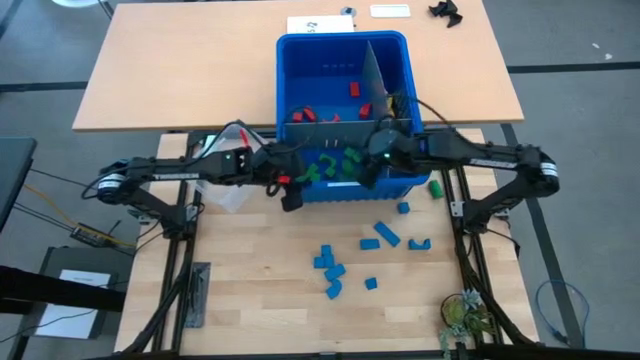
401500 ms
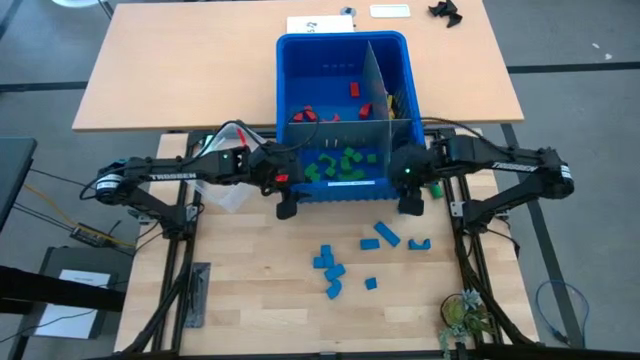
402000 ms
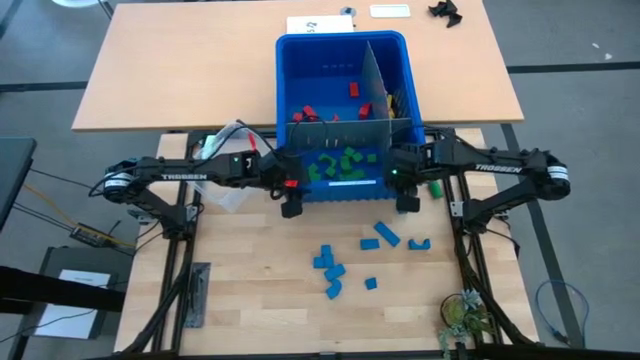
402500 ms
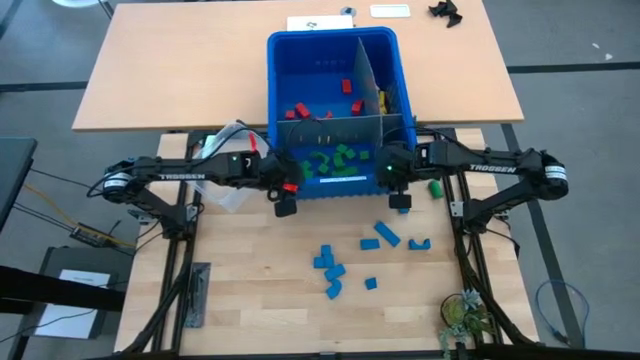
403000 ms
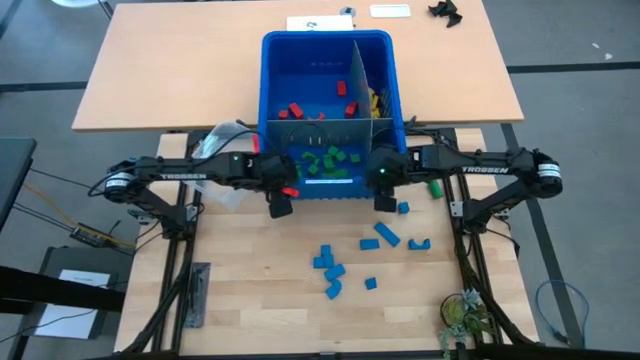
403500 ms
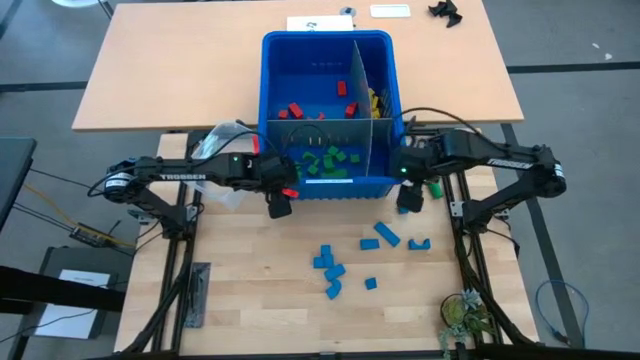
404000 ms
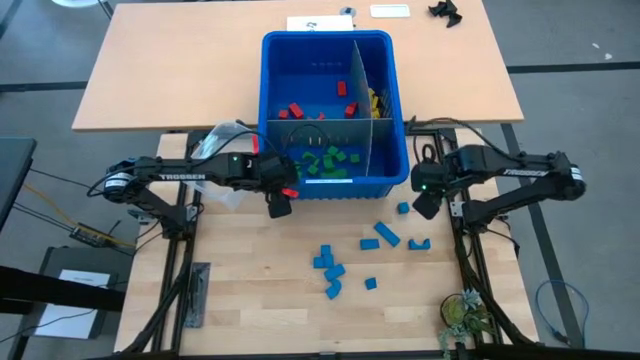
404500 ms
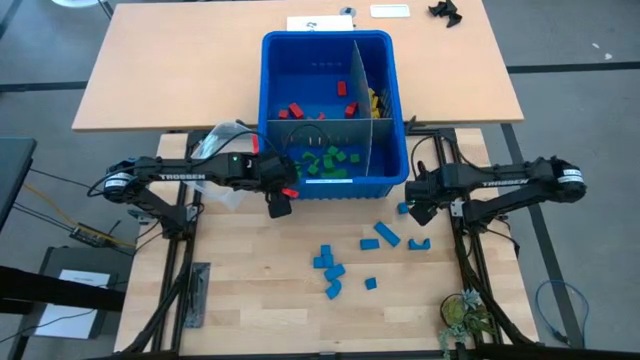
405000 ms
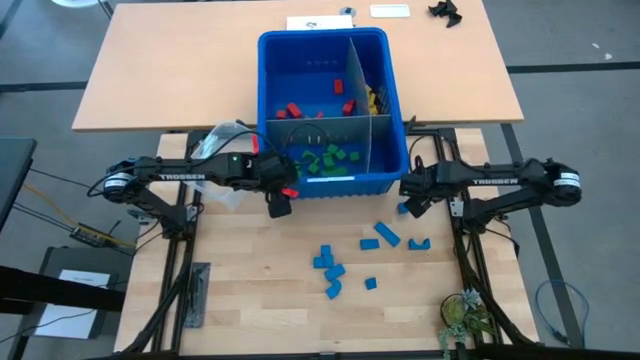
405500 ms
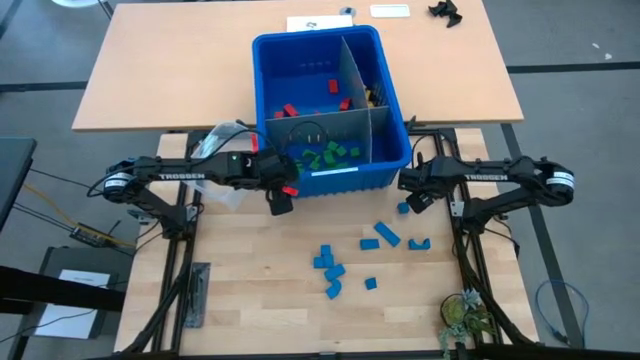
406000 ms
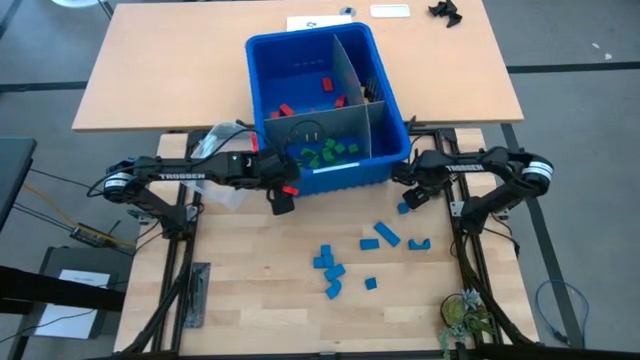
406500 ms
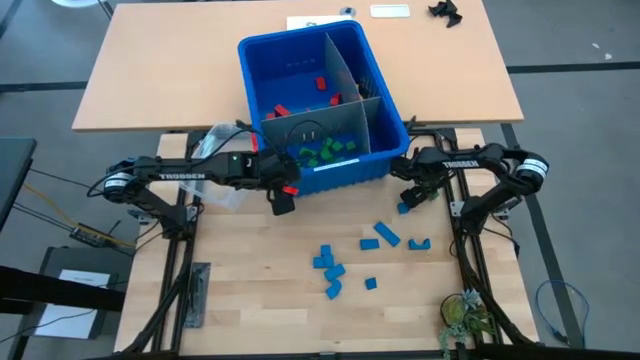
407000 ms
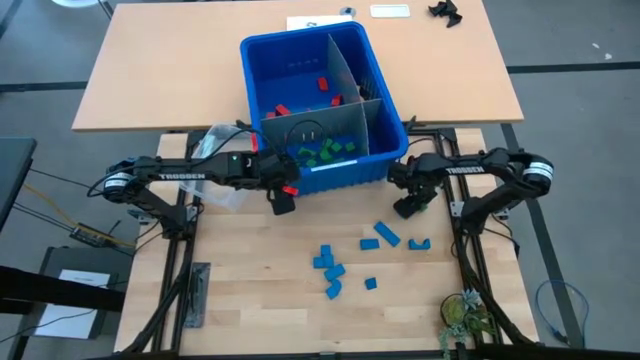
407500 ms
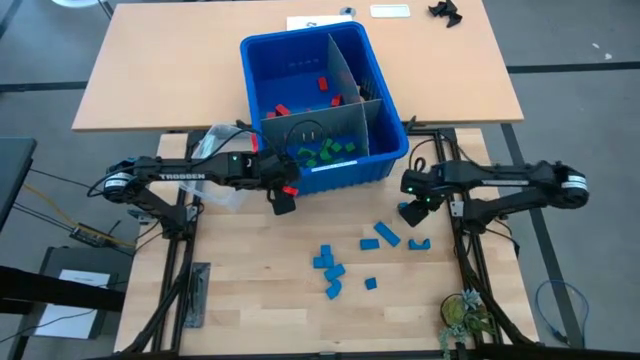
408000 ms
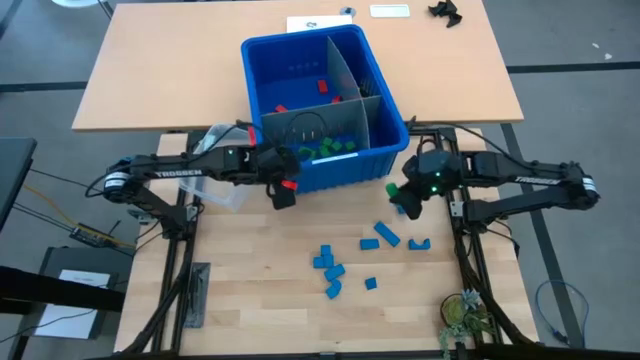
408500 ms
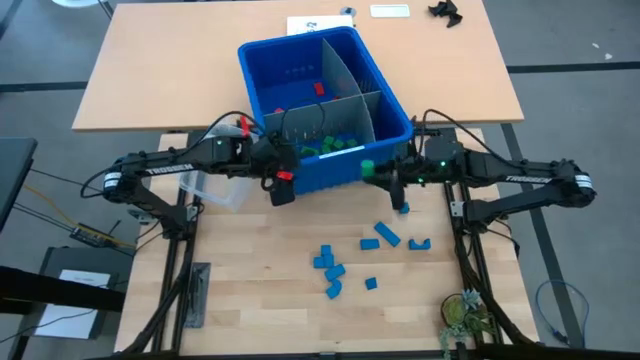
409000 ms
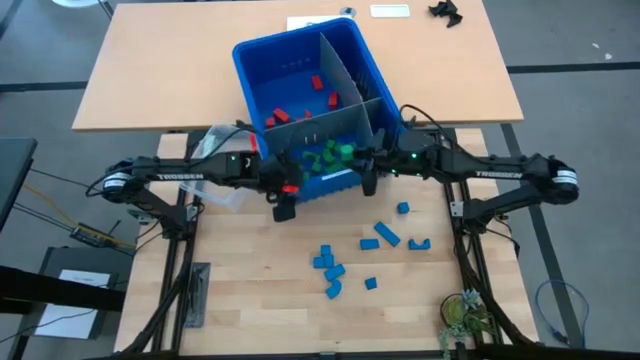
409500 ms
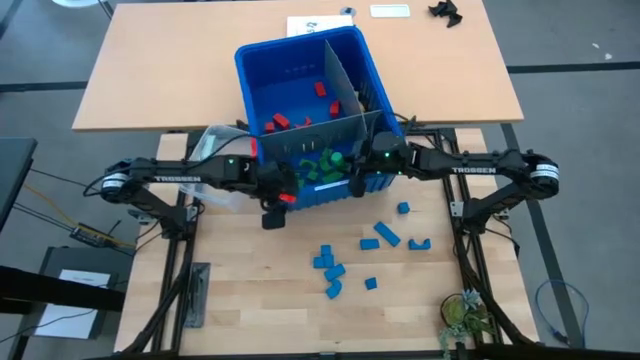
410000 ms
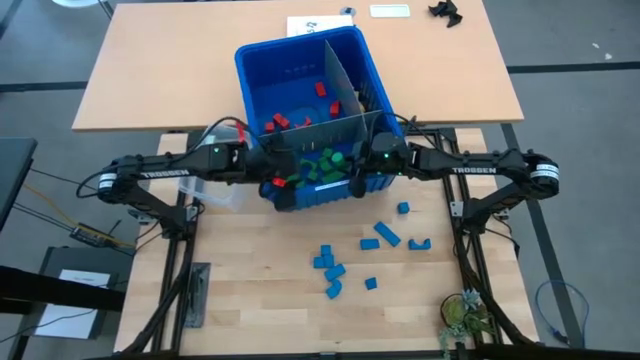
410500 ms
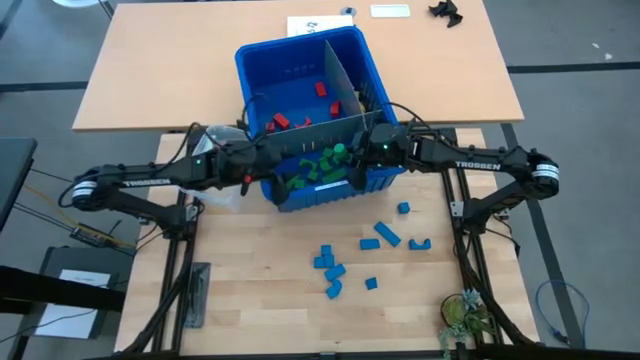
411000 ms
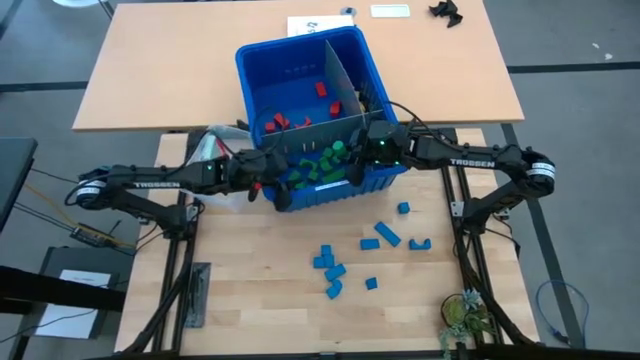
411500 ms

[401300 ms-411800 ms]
Task: Sort blocks
Put the green block into the blue bin

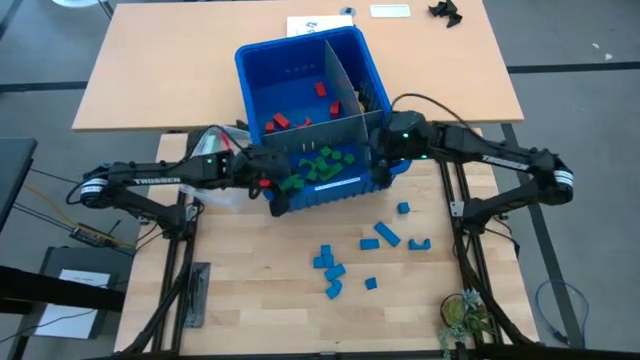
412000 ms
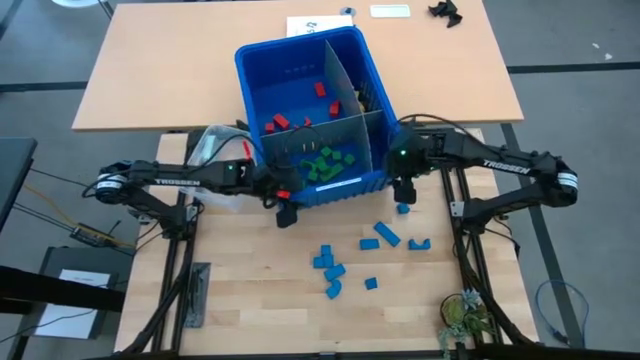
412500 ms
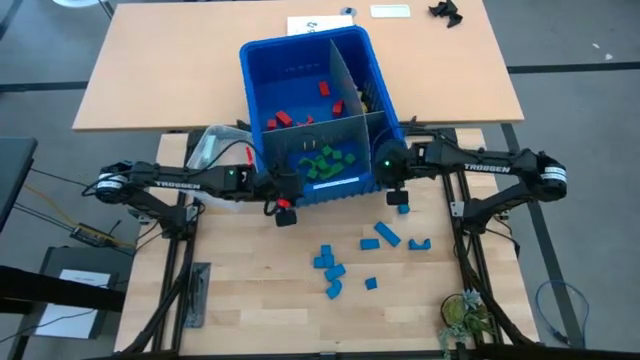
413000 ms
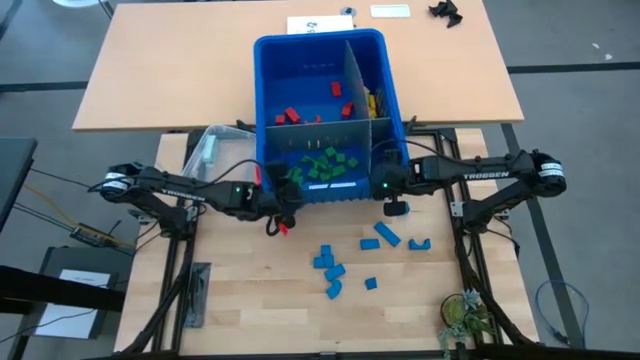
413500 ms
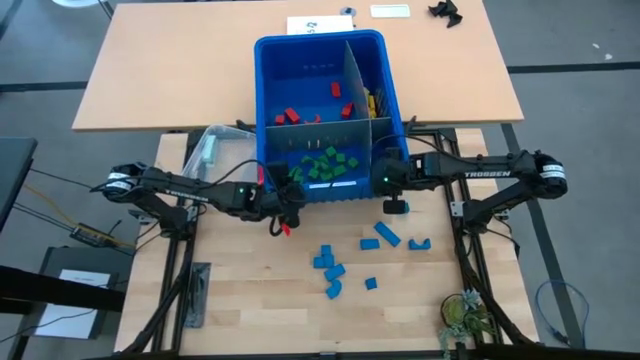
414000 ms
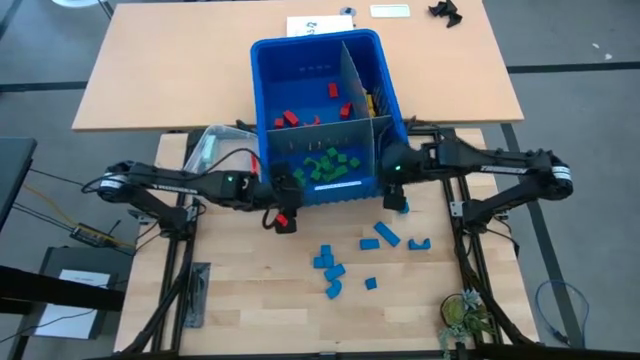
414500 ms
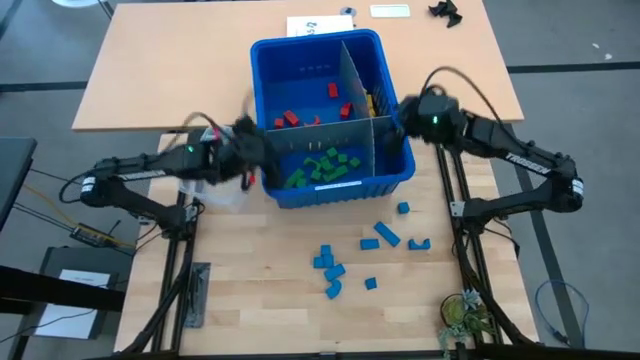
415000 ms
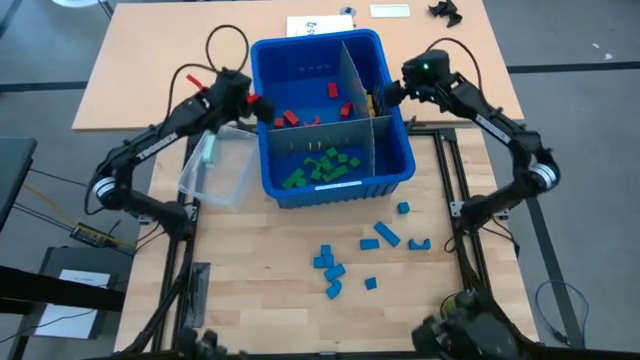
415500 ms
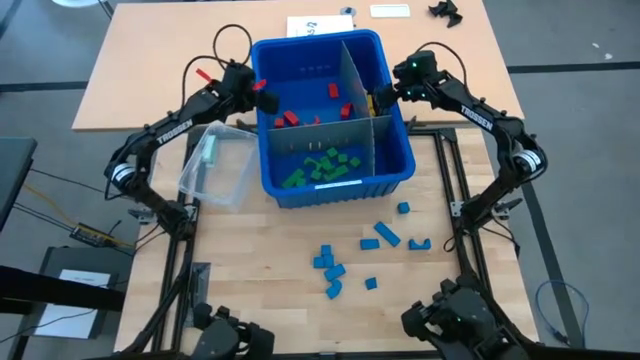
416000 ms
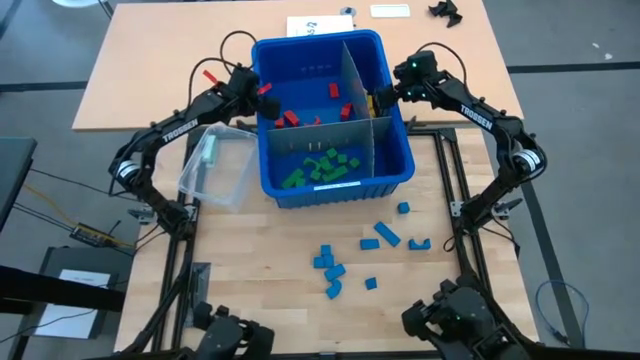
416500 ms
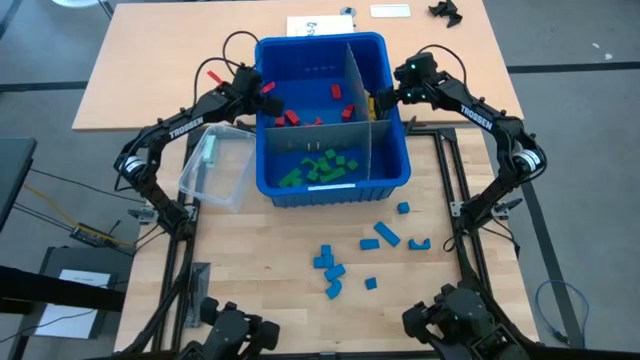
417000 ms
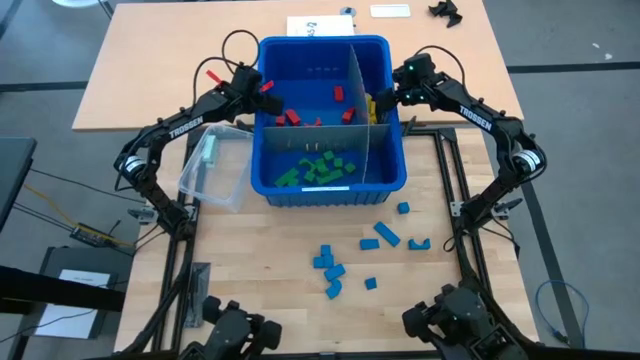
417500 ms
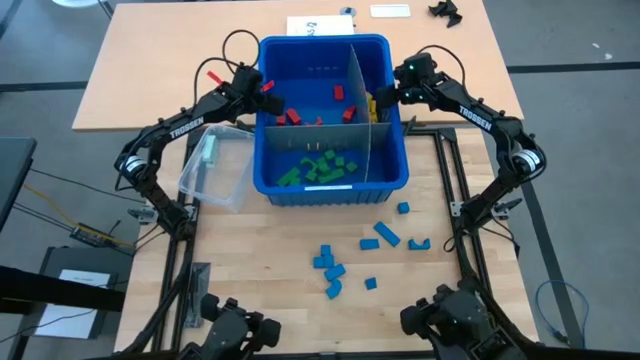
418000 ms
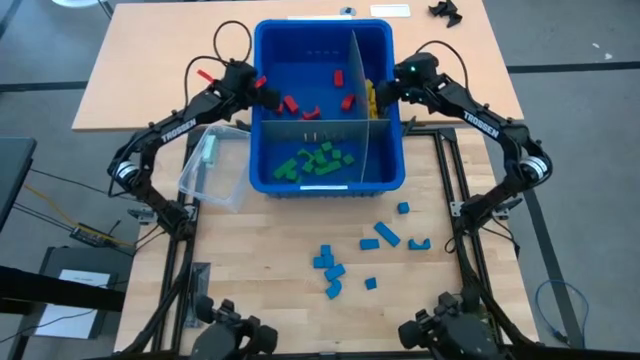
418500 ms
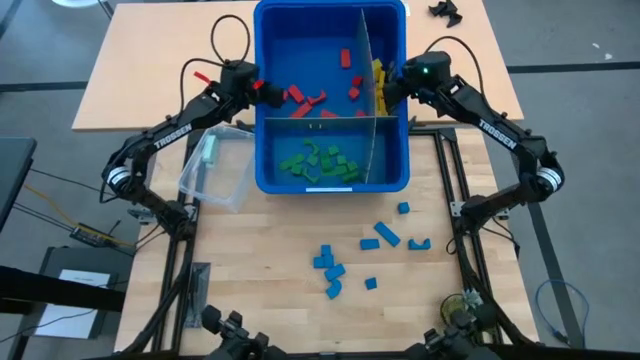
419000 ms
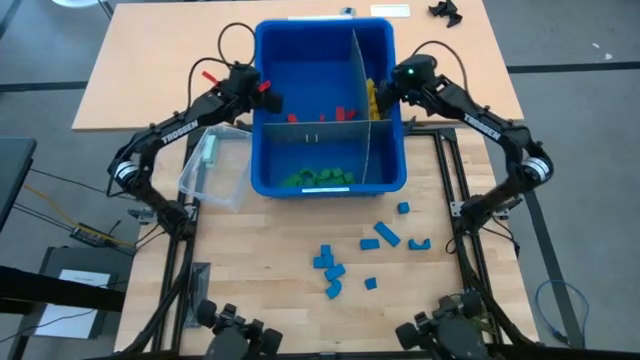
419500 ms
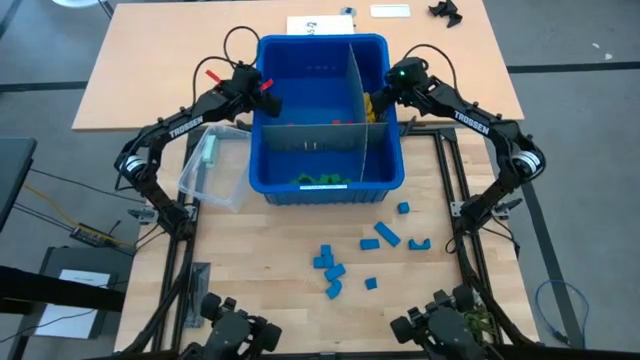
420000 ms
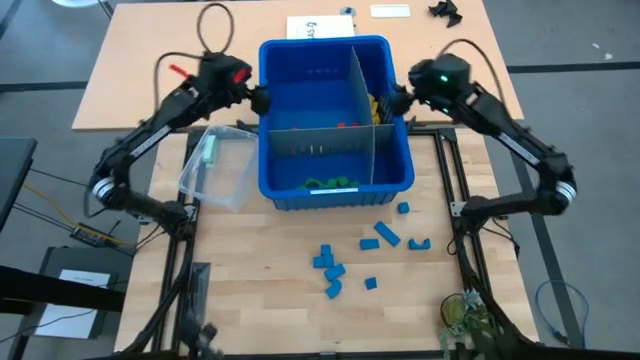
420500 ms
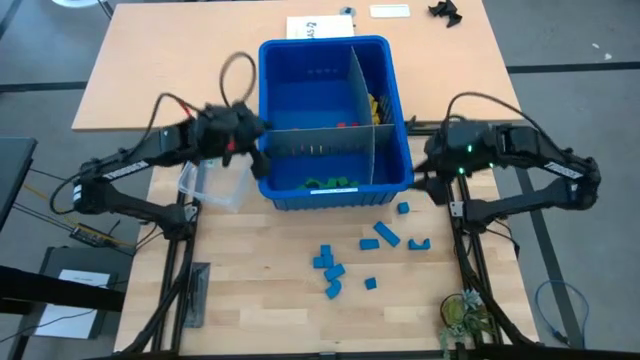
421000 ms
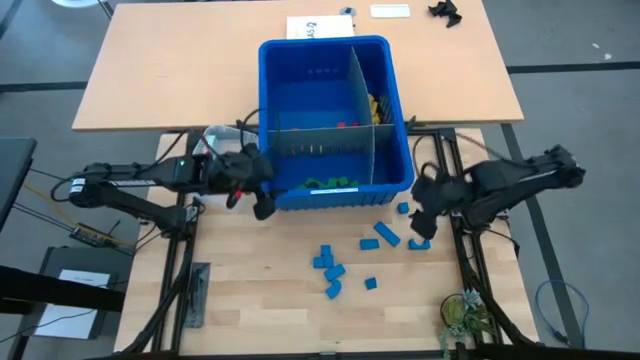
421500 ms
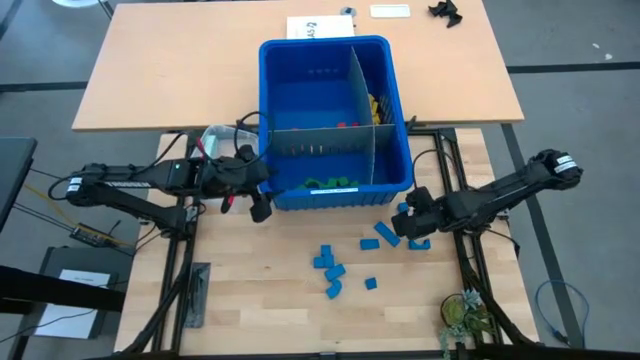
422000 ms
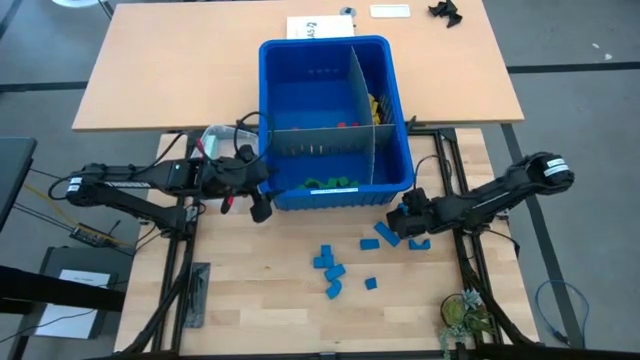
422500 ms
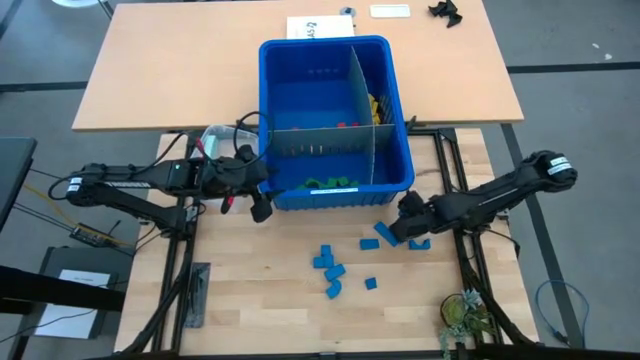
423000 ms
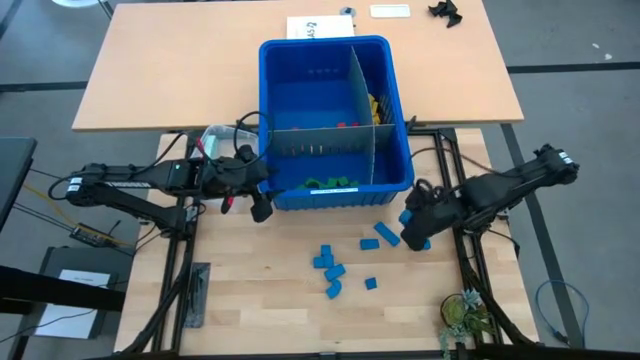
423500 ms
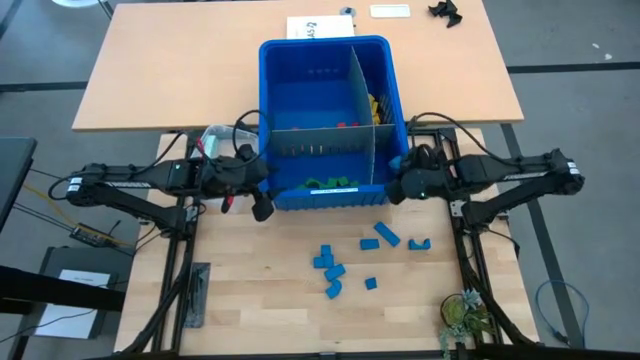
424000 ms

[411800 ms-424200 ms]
Put the blue block into the blue bin
